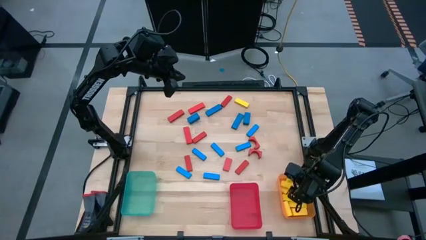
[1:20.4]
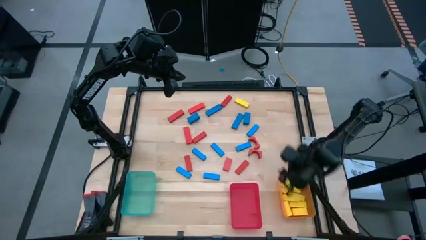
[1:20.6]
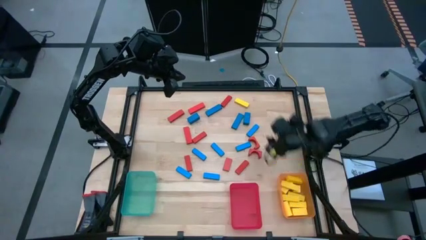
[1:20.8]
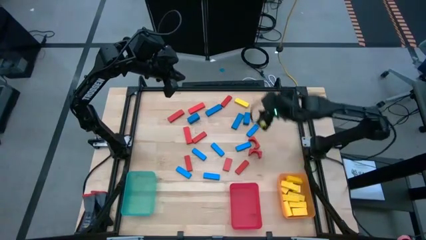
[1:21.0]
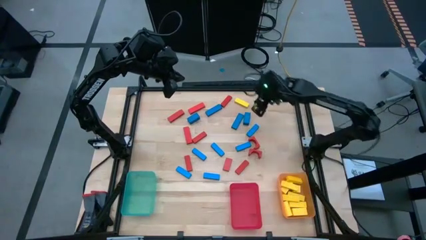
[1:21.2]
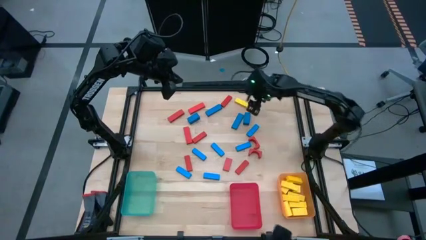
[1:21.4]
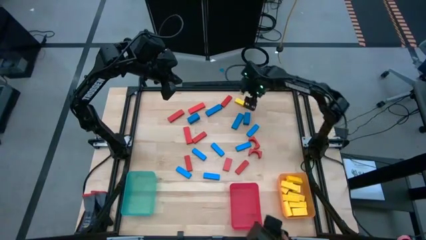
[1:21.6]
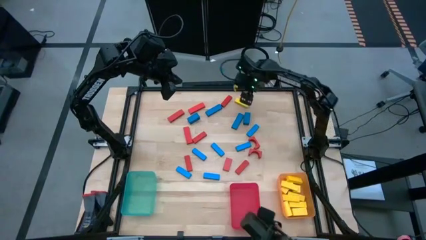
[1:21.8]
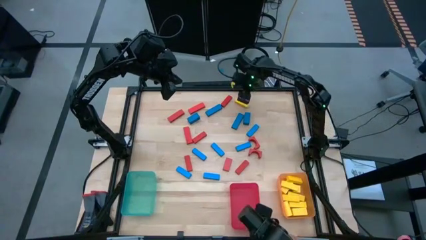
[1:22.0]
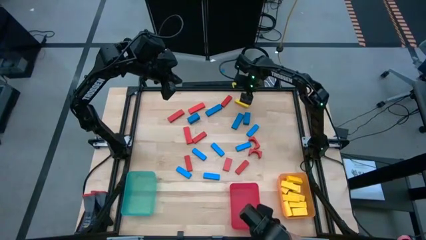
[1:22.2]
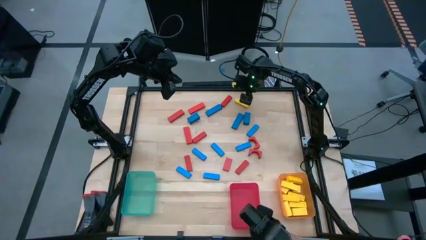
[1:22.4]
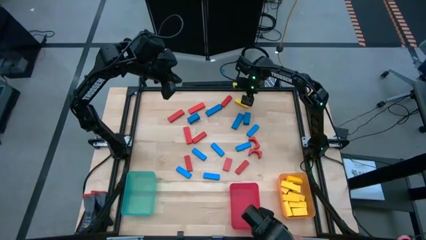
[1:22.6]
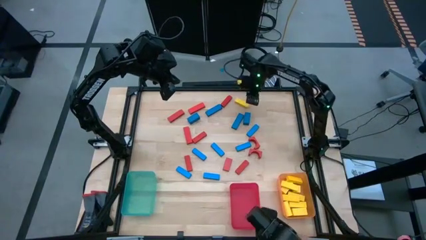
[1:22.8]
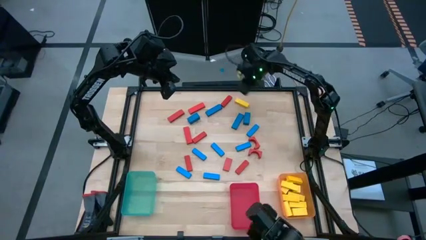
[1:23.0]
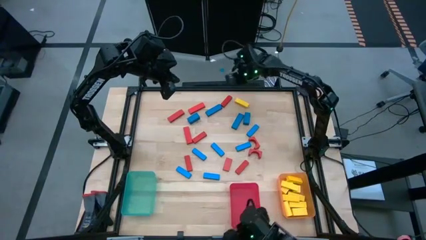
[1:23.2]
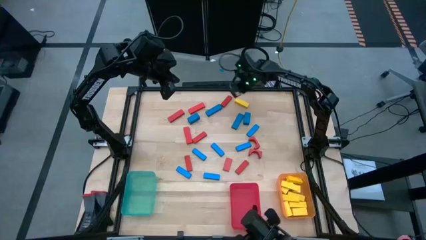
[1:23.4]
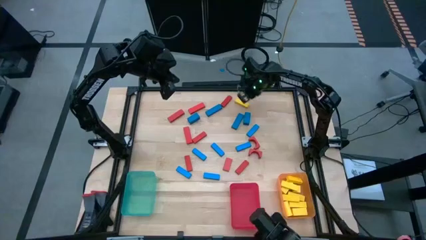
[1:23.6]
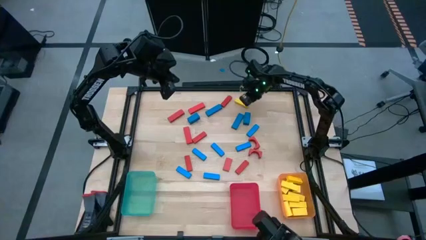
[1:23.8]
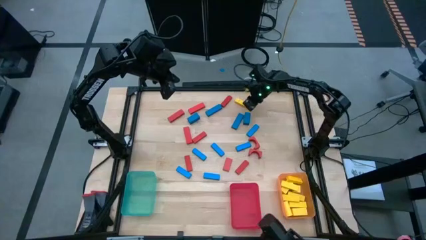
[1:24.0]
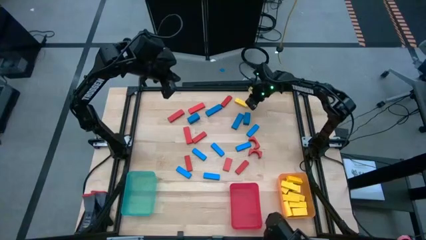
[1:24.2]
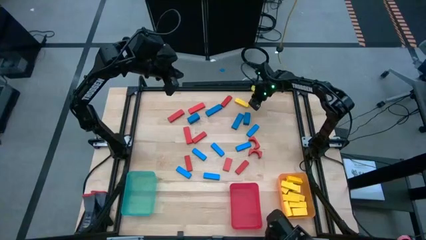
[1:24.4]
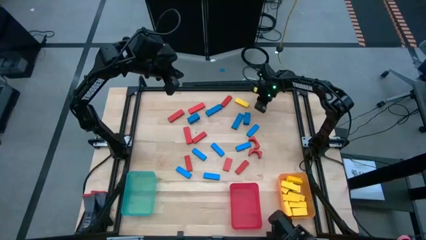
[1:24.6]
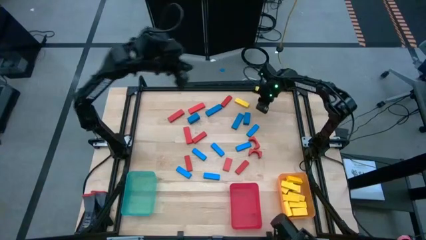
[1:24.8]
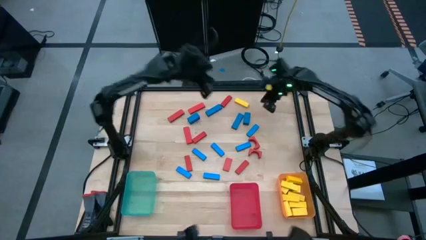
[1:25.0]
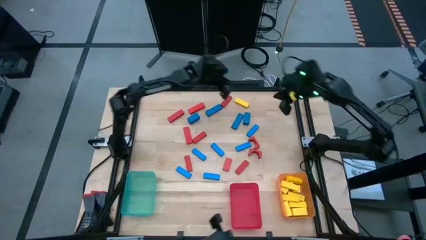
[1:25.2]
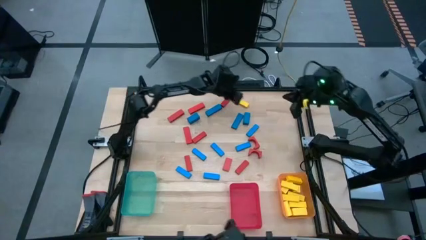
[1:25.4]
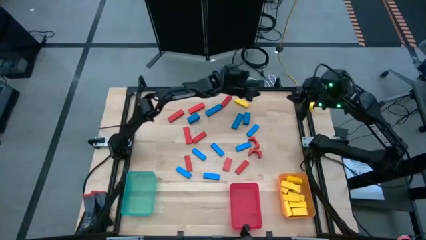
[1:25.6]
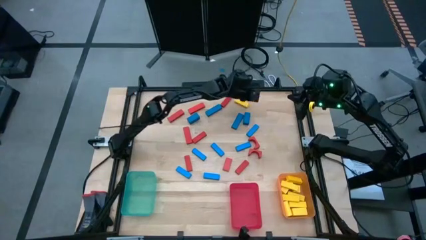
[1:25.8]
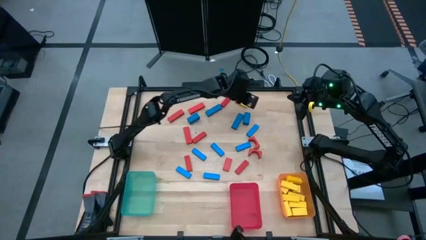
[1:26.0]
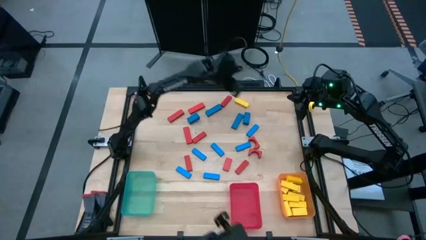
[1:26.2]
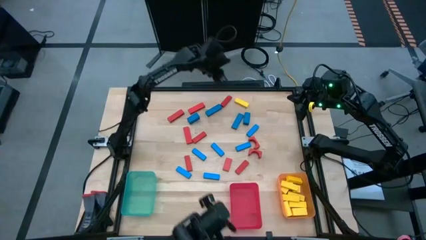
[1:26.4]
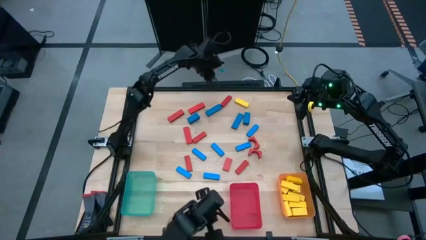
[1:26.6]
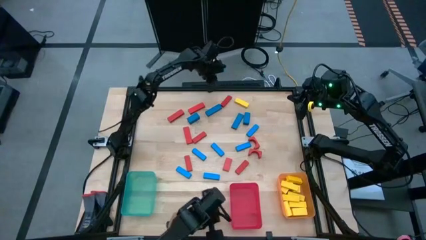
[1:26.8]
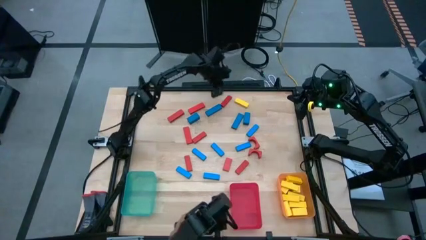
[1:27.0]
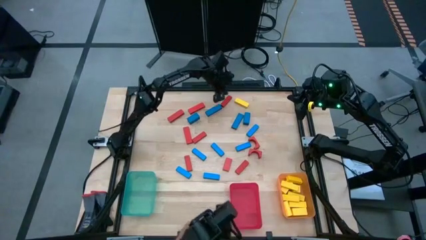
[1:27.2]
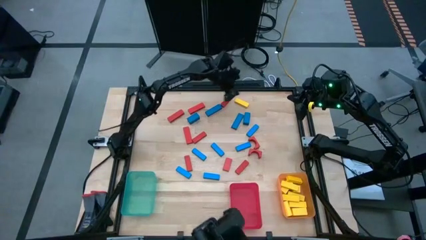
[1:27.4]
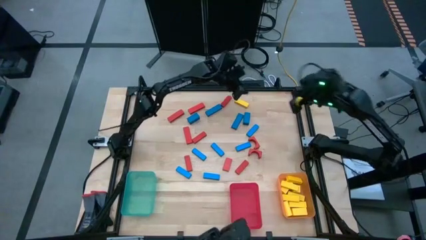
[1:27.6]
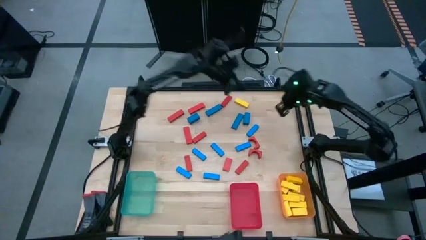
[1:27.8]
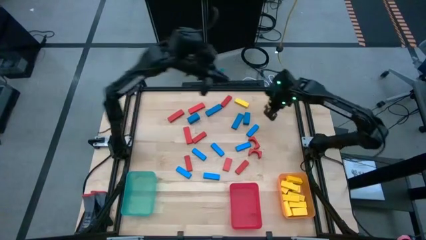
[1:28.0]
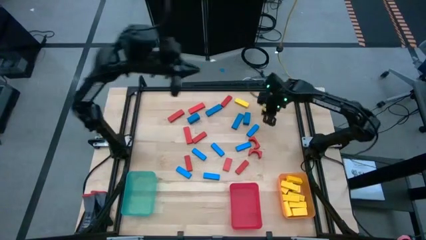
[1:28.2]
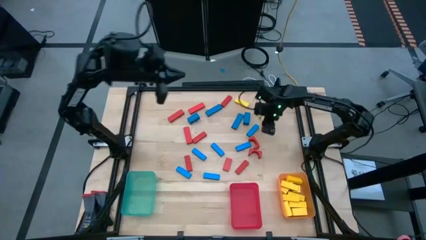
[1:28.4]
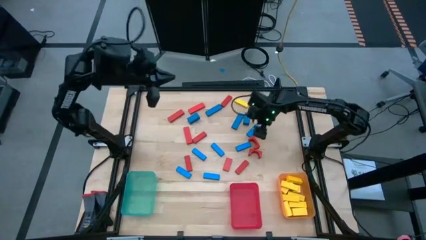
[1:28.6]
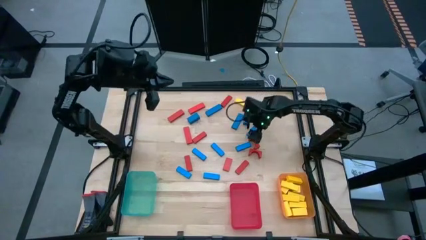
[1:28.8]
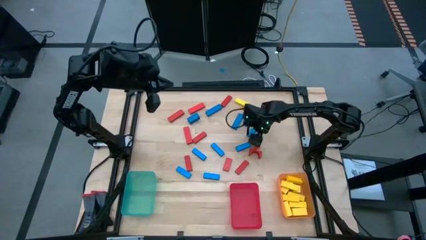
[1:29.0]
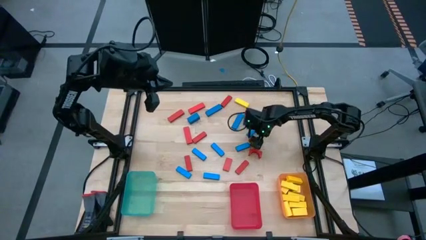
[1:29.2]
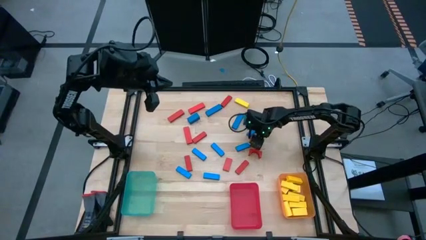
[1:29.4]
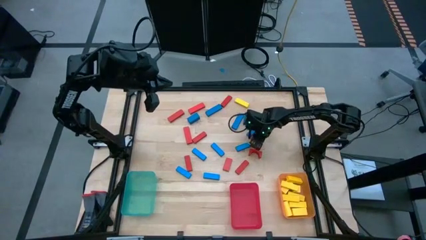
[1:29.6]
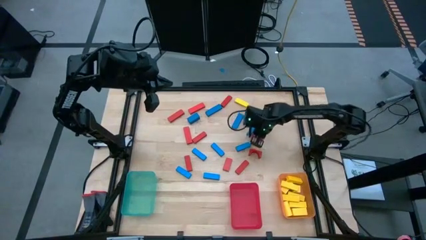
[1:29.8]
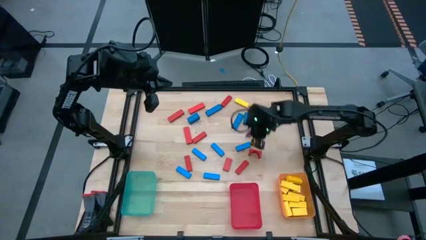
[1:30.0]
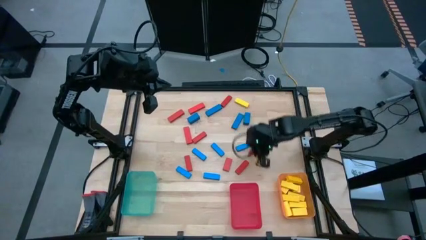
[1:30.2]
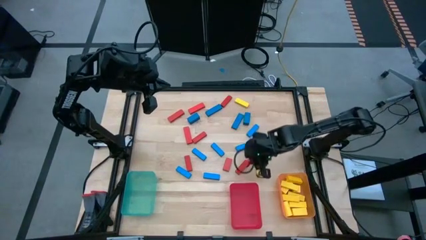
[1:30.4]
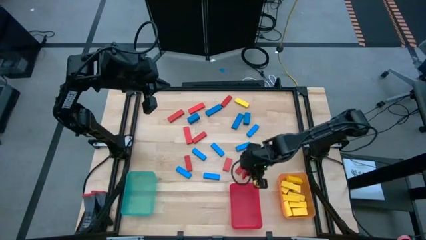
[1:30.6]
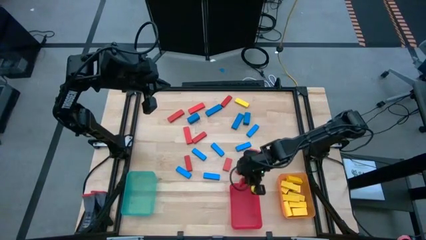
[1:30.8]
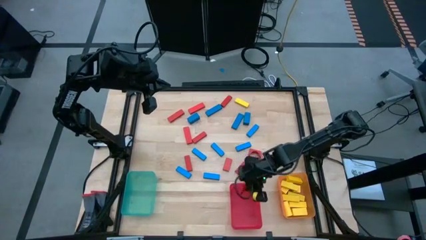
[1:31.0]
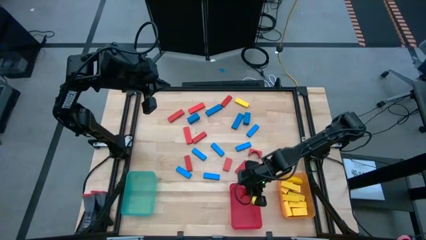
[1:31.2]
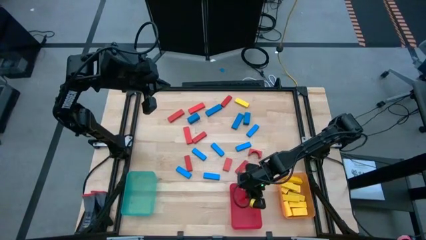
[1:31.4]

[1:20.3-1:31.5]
Task: Sort blocks
Put the red block into the red bin

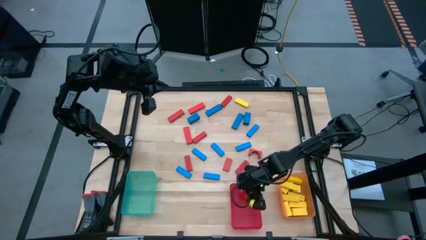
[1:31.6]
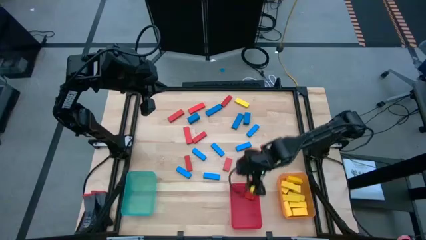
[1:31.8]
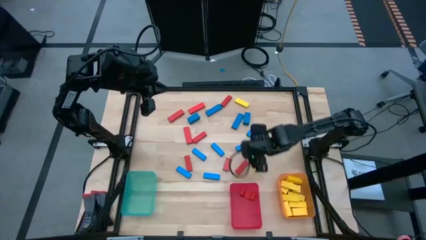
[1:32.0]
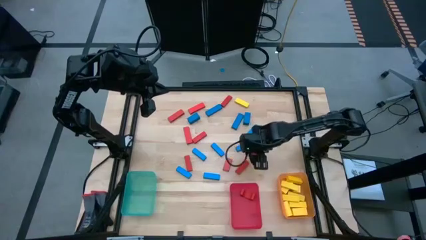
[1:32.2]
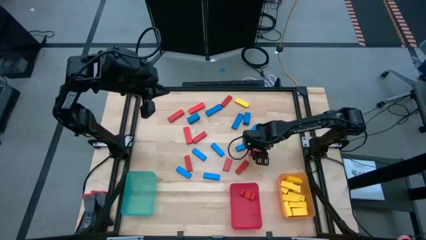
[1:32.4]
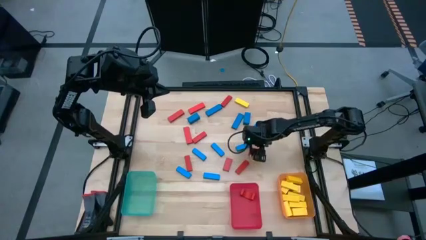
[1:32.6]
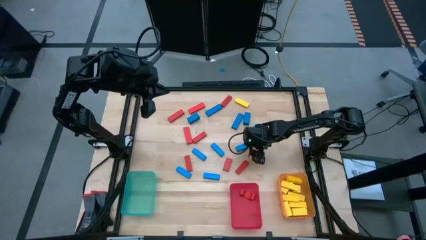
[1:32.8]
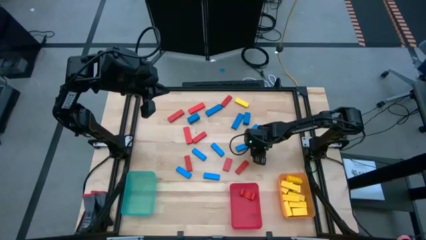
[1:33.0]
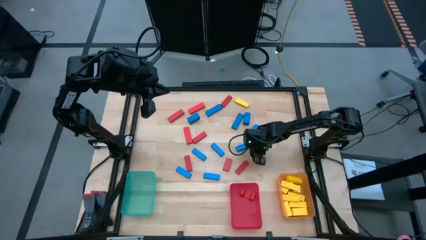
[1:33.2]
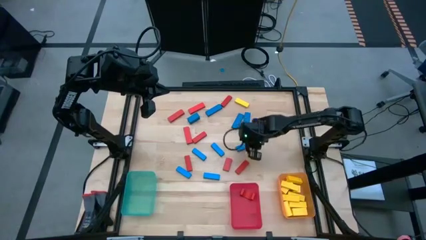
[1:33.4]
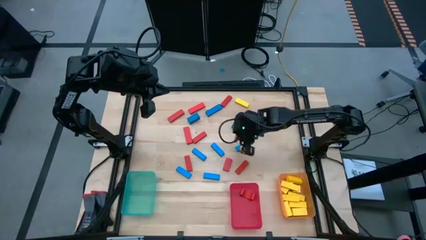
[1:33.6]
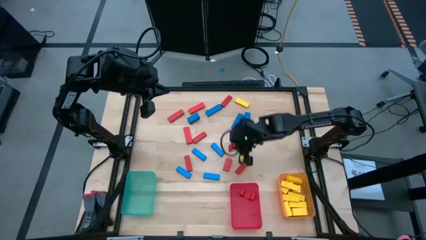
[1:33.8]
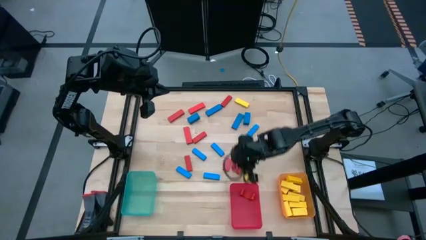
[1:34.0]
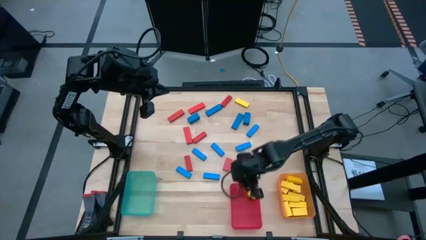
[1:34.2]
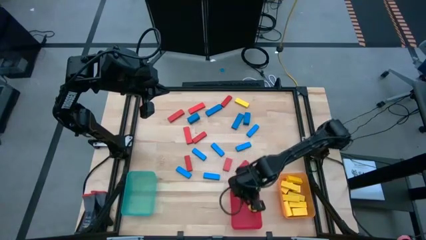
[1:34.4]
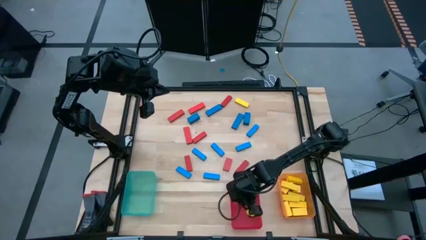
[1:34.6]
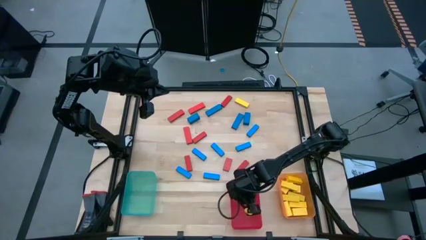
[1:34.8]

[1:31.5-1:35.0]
Put the red block into the red bin

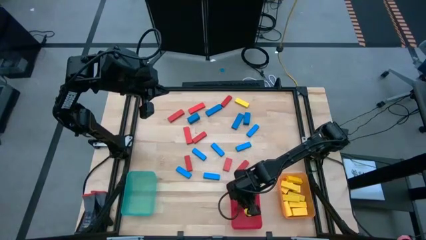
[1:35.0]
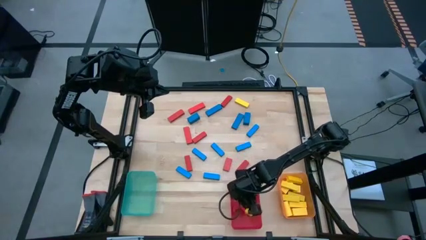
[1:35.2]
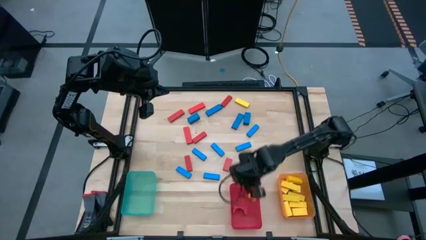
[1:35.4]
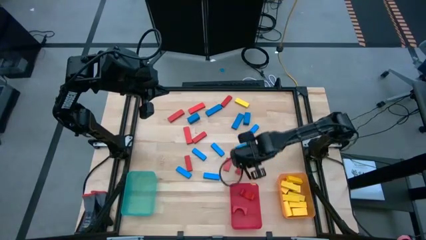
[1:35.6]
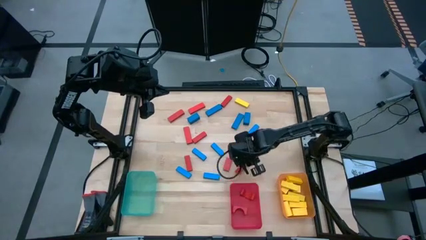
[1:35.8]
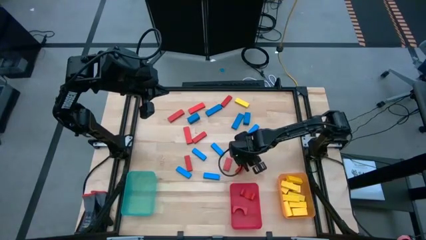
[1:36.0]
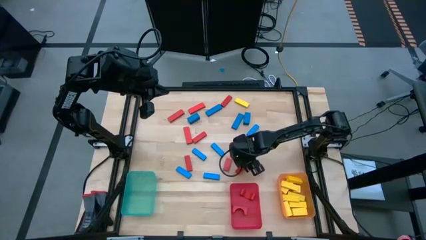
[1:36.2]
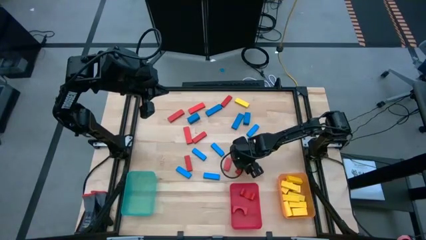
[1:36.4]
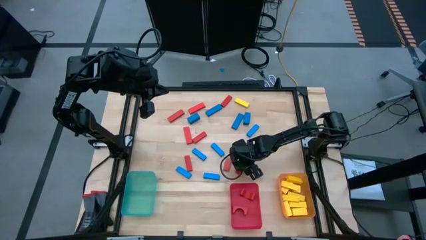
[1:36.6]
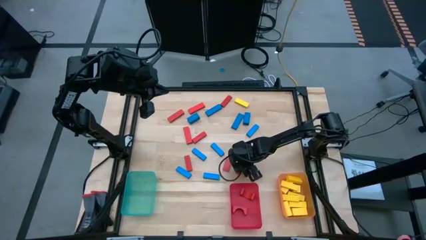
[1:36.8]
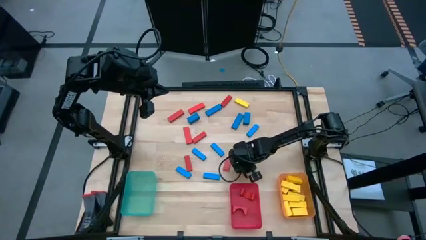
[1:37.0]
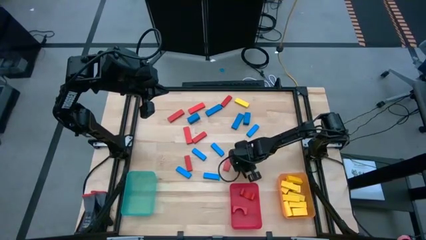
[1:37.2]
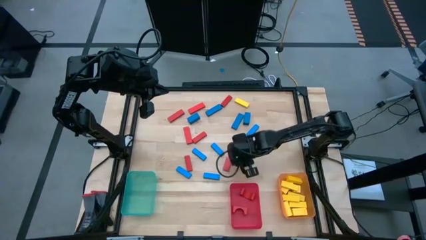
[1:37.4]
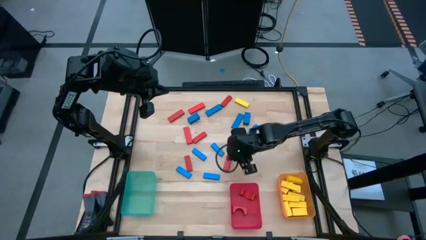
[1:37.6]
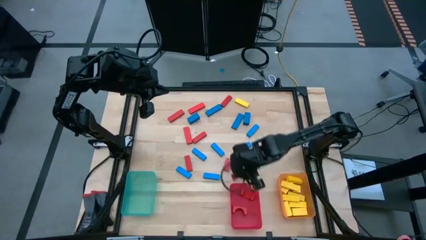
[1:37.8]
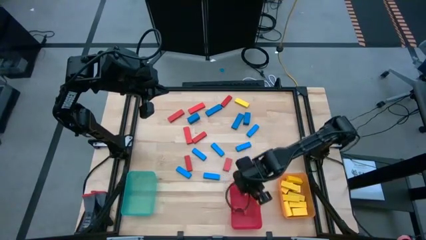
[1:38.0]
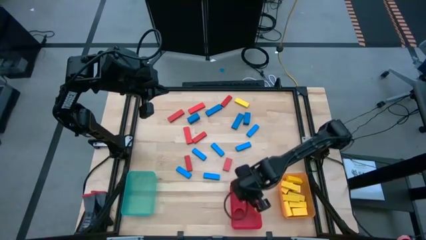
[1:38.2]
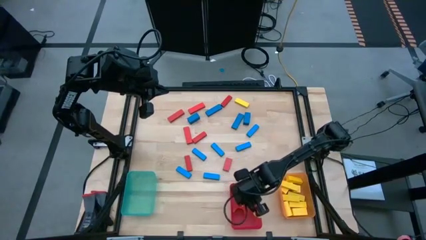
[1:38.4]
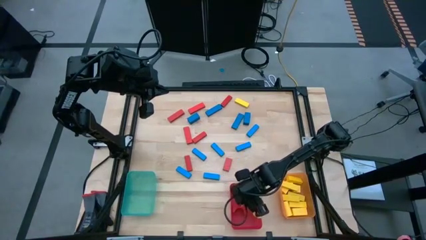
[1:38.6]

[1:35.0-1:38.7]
Put the red block into the red bin
